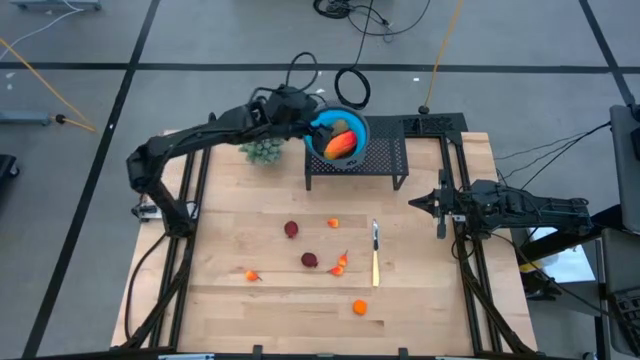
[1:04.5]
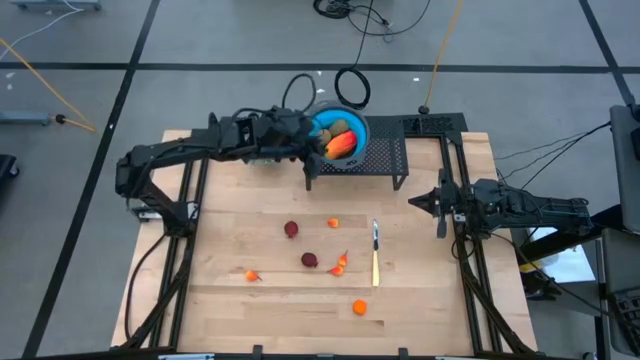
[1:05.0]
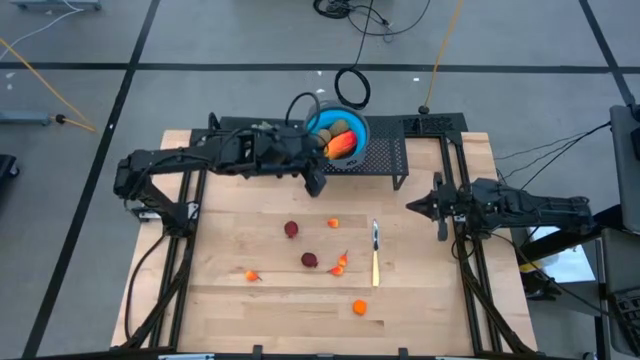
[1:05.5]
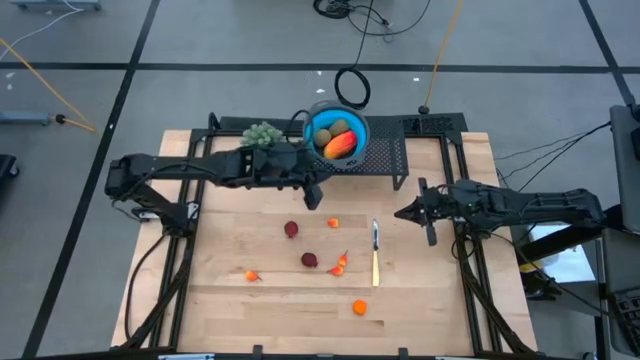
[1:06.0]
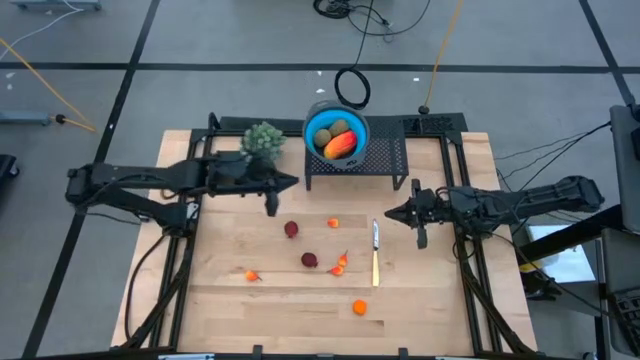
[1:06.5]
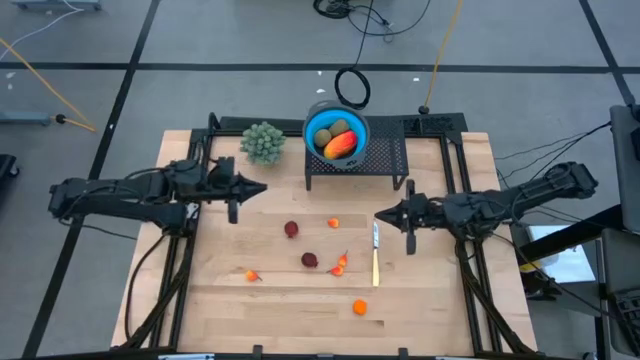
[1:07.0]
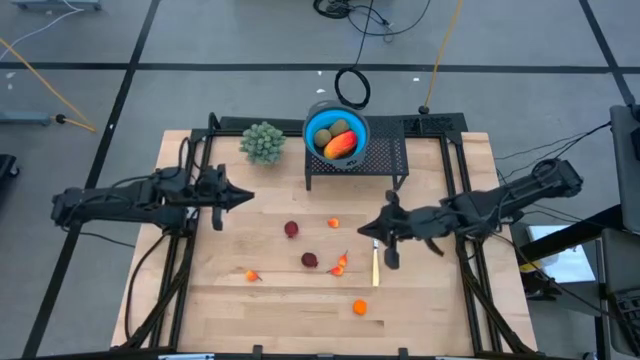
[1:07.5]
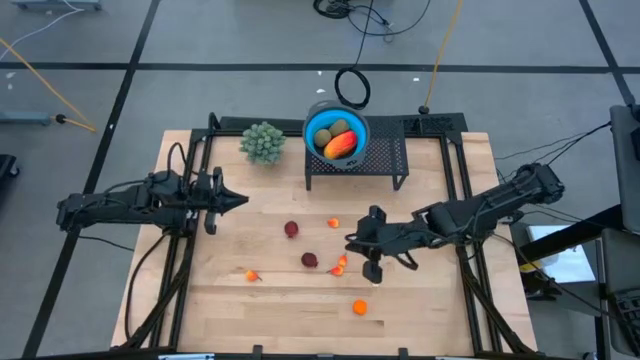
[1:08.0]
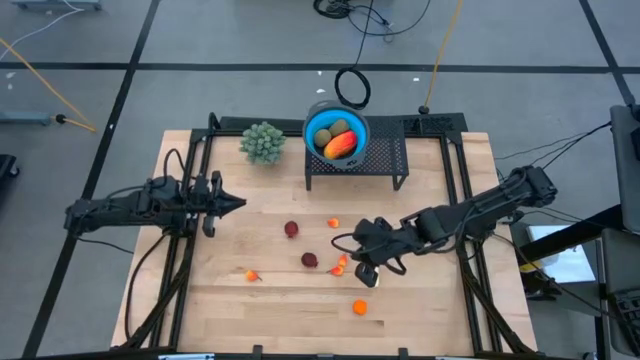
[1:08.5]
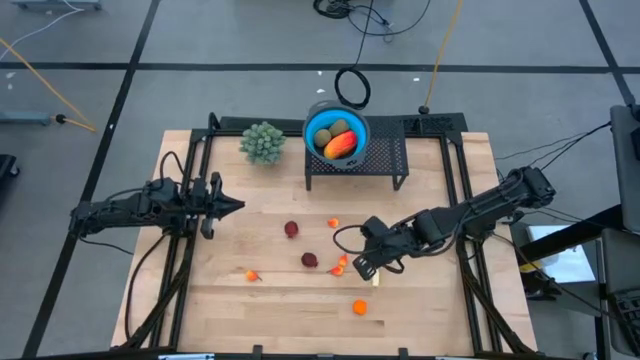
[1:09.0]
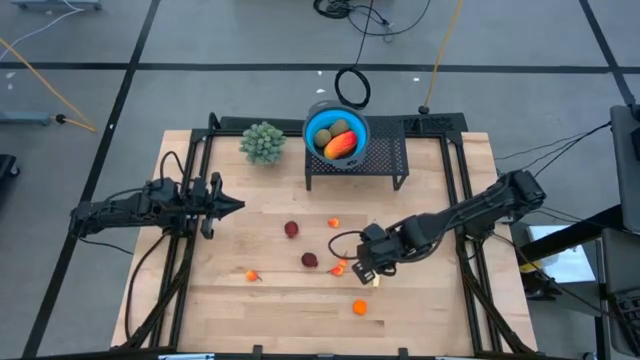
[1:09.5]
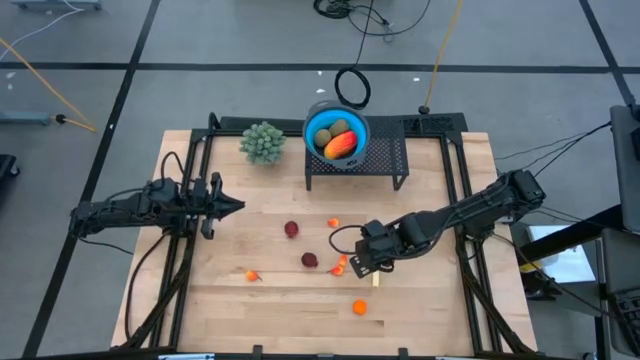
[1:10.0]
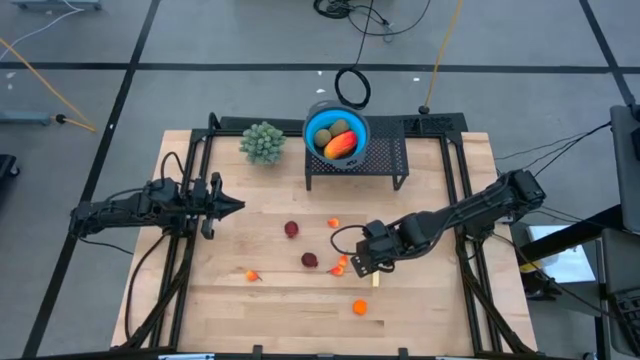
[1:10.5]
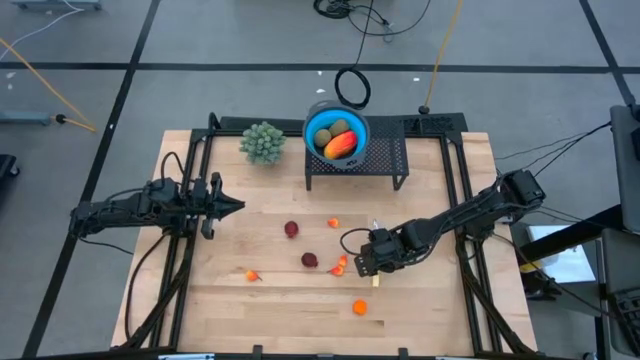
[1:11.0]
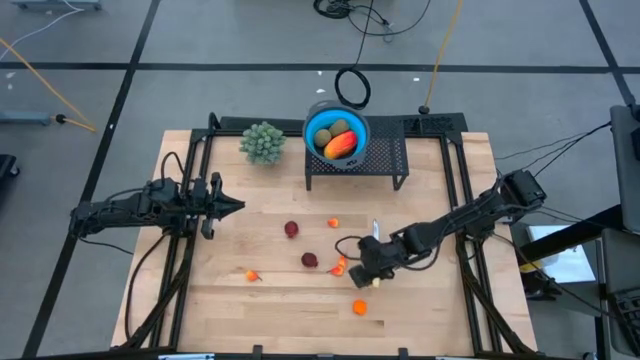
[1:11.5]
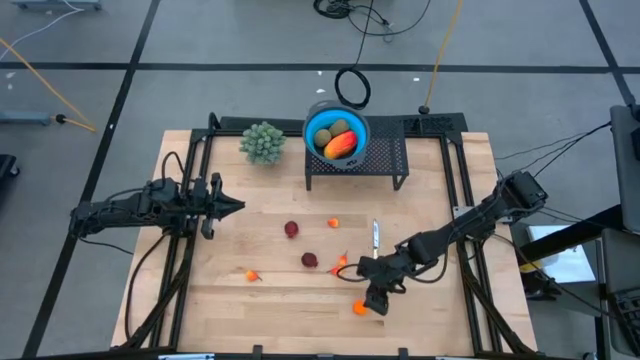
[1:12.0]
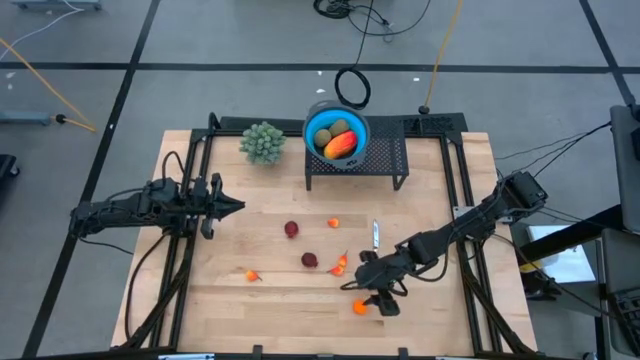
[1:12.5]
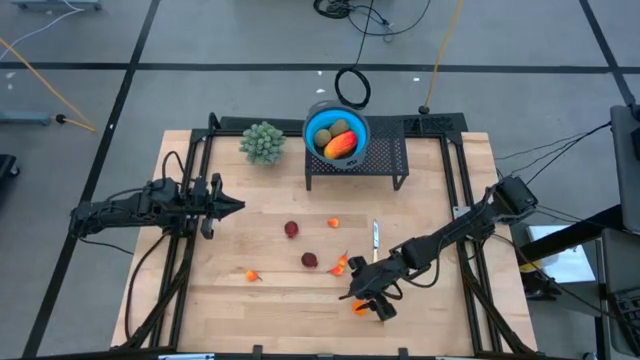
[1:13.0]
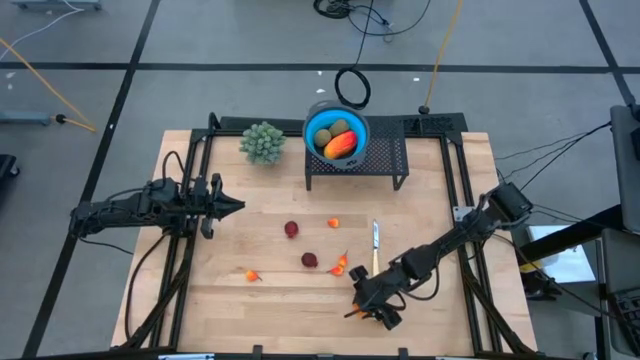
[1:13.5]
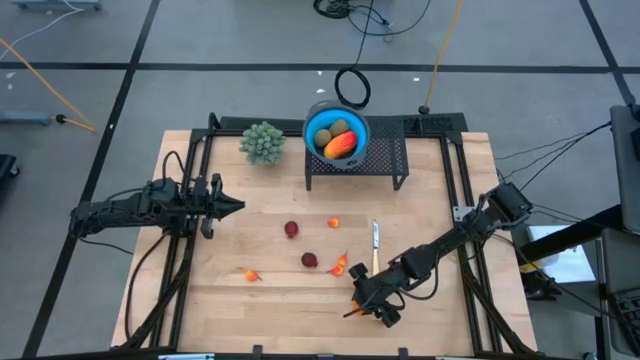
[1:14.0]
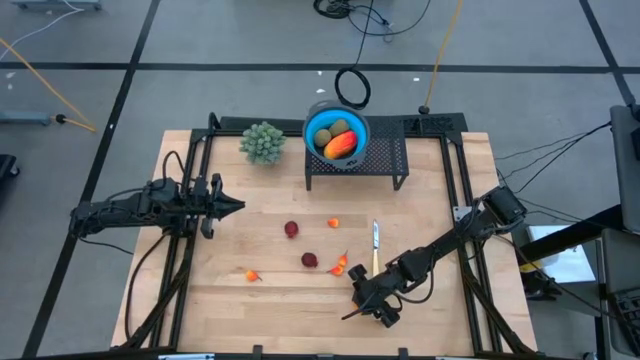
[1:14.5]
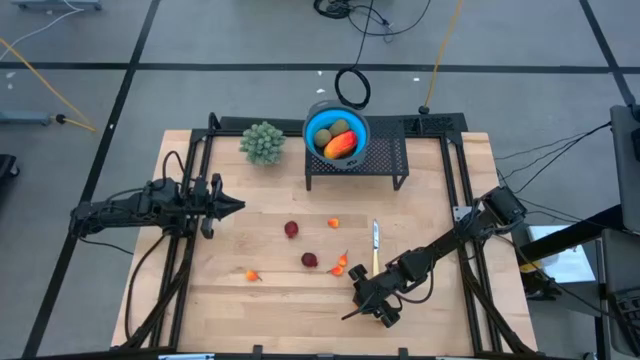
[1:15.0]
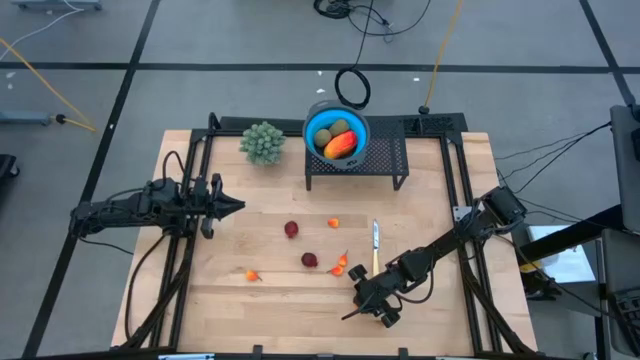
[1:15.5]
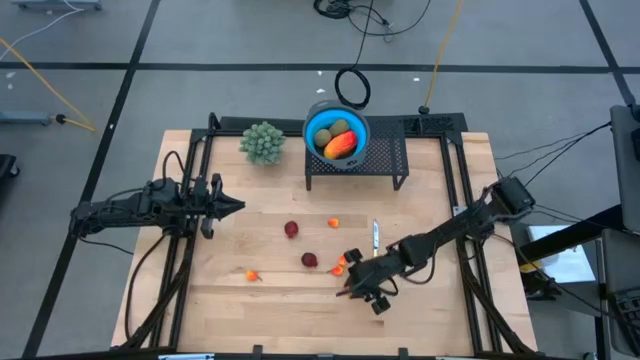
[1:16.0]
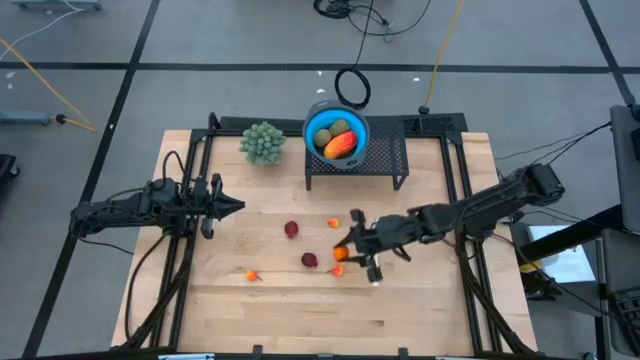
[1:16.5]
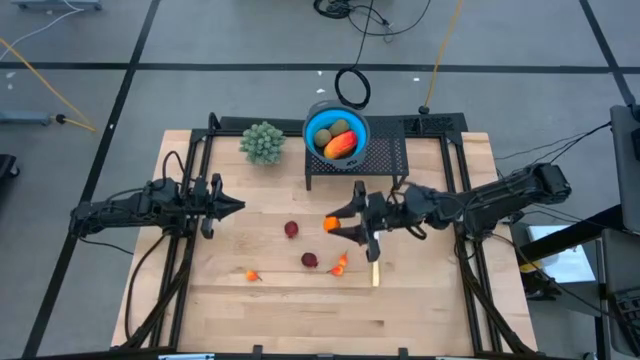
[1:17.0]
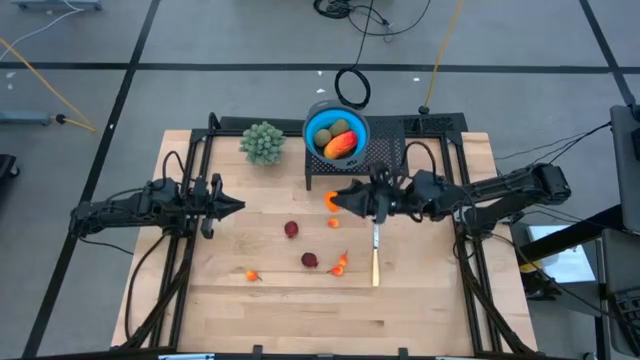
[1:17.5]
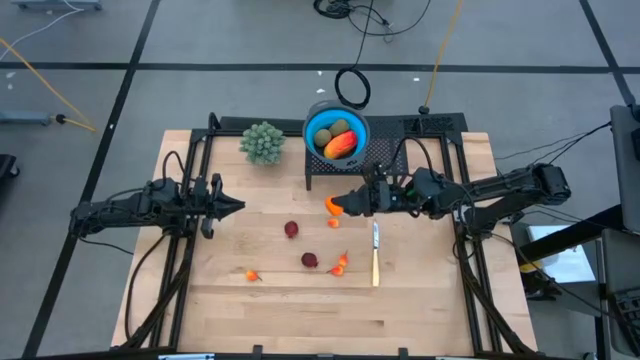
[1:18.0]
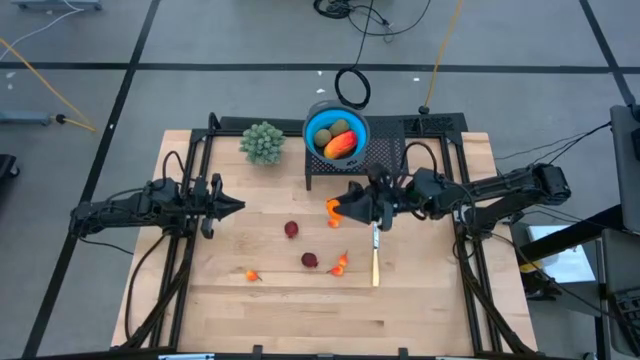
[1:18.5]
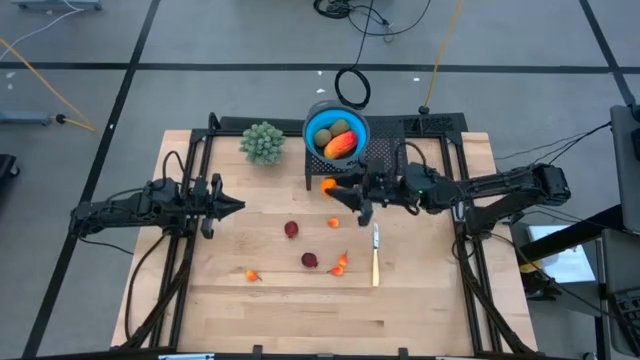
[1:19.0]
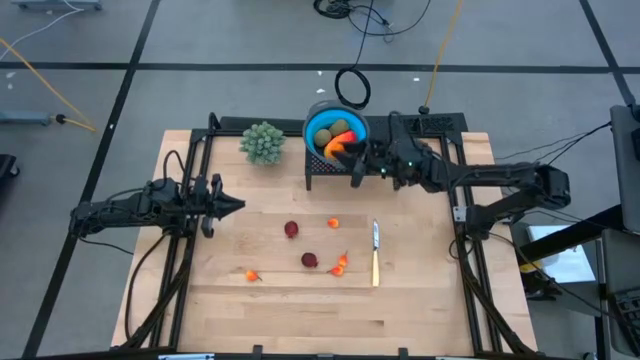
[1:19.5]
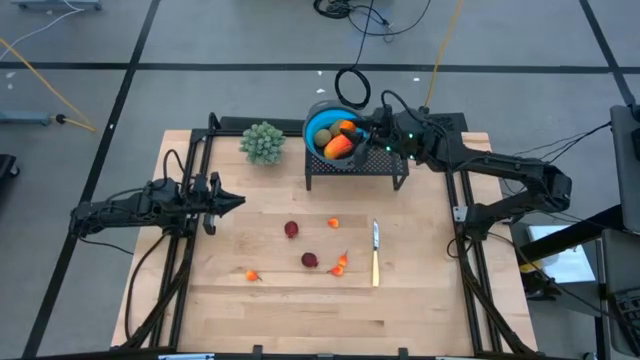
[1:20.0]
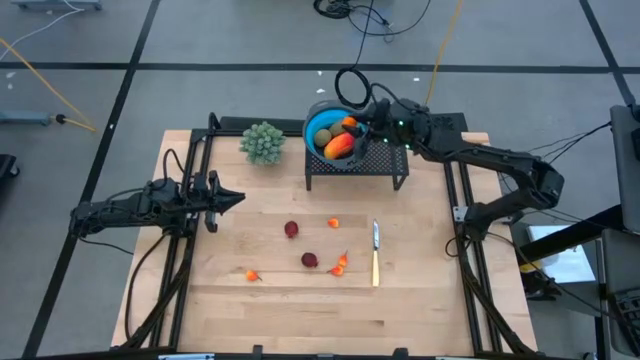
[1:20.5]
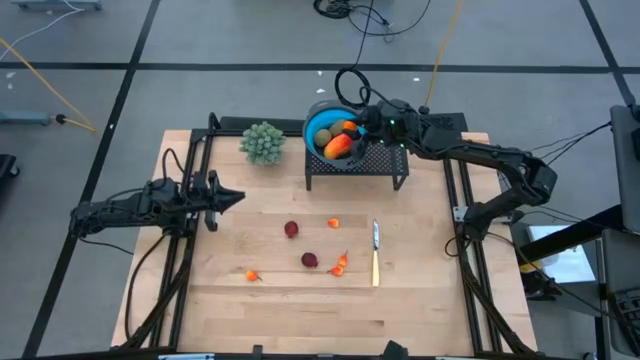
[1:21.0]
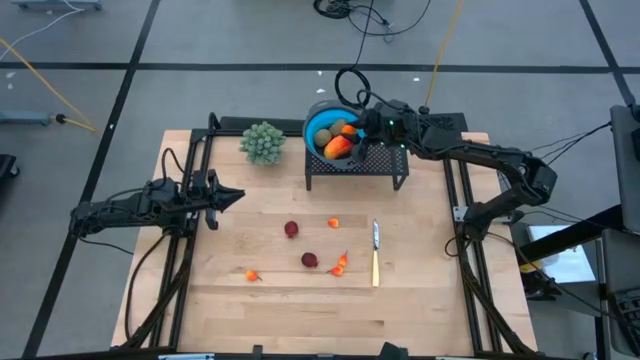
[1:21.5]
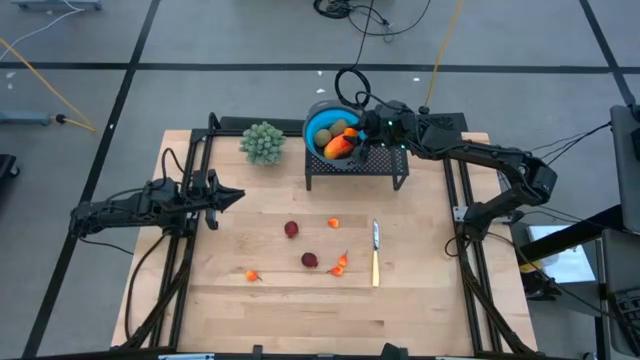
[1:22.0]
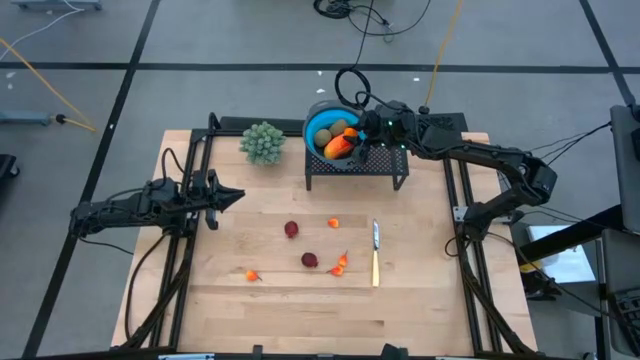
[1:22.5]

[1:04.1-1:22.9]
Task: Pick & Place Fruit
Put the orange into the blue strainer bowl on the shelf

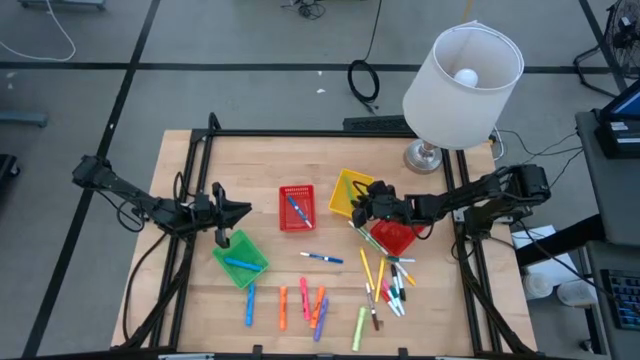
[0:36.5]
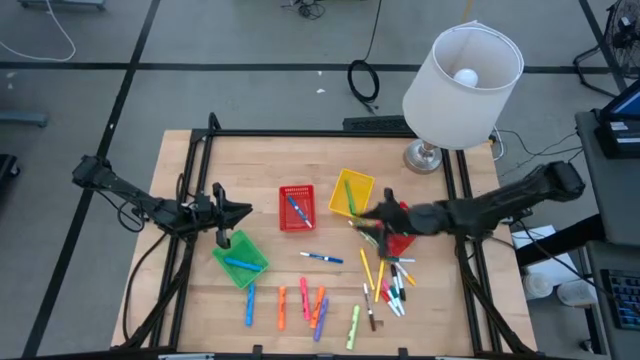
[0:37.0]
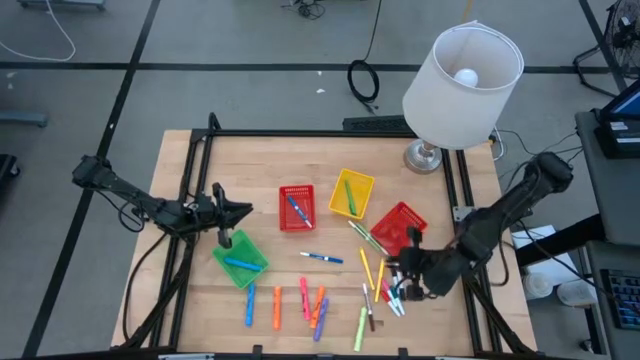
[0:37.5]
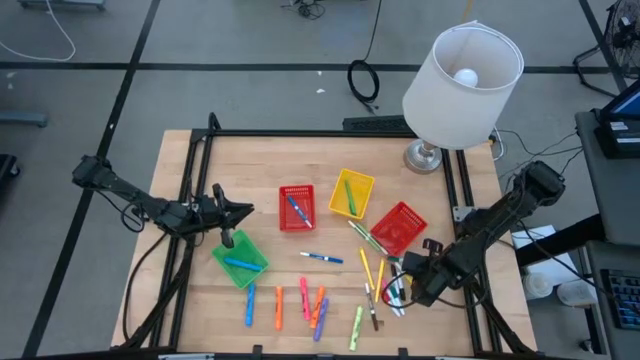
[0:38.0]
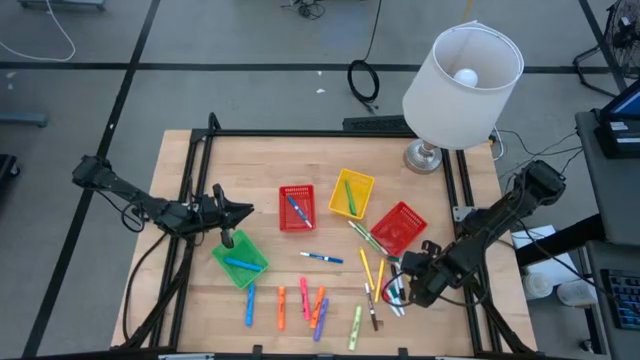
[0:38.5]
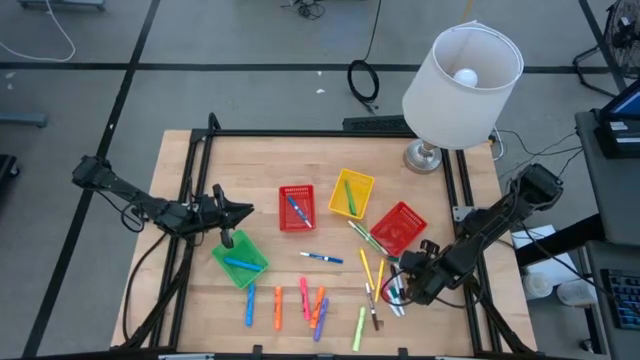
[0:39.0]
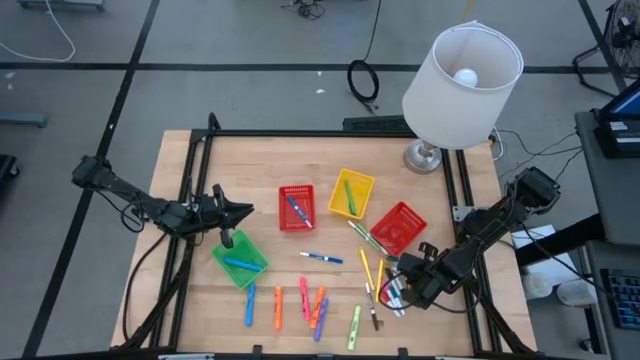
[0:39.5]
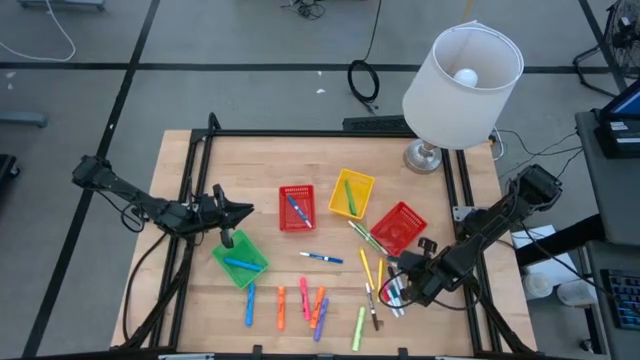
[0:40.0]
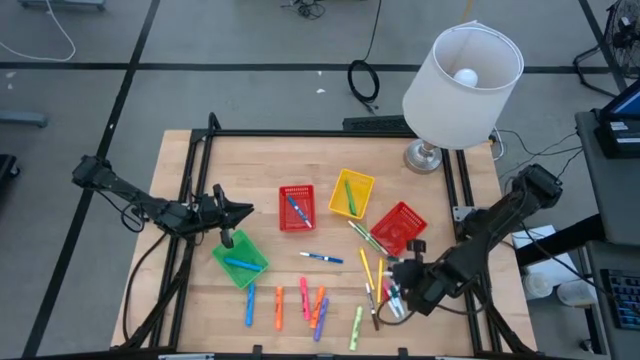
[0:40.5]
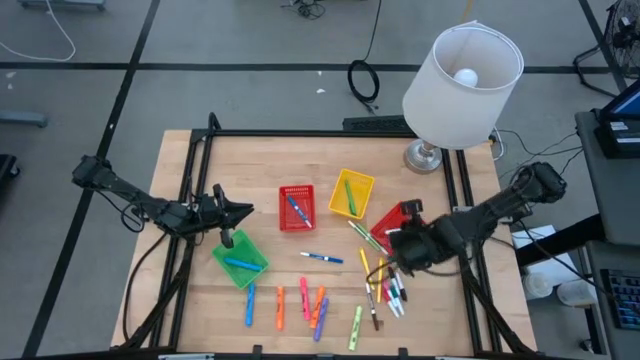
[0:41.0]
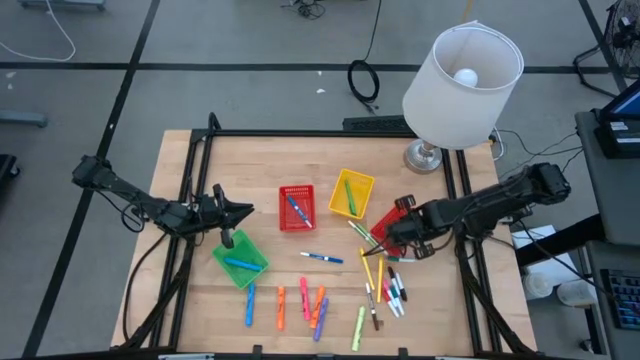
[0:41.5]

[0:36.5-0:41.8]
Task: Pick & Place Markers
Put the small yellow highlighter pen into the right red bin
